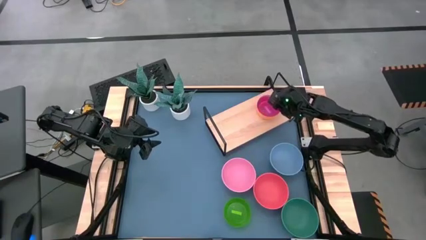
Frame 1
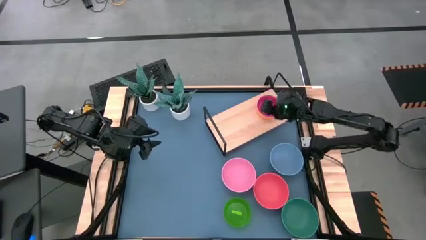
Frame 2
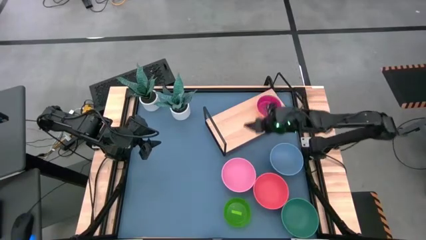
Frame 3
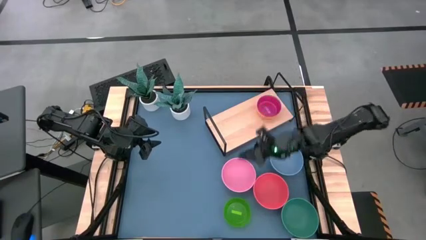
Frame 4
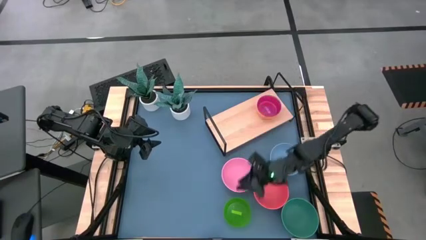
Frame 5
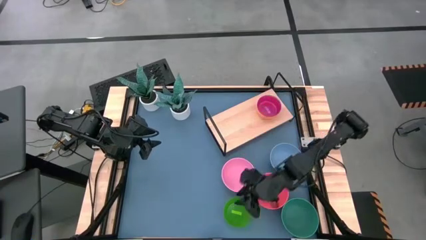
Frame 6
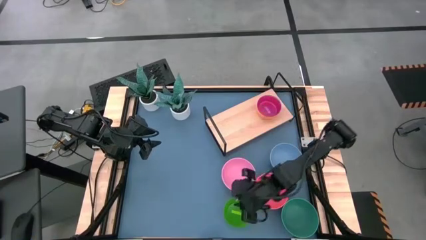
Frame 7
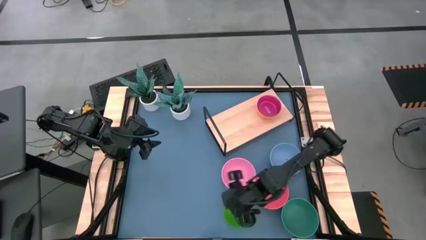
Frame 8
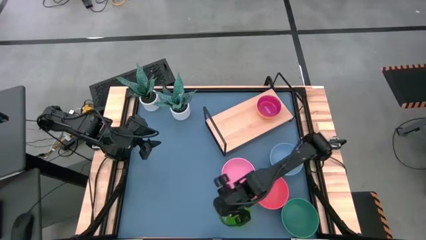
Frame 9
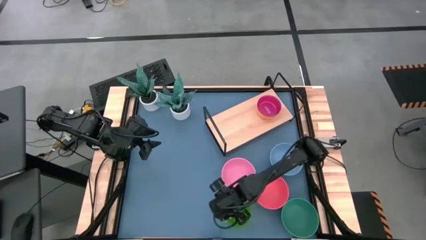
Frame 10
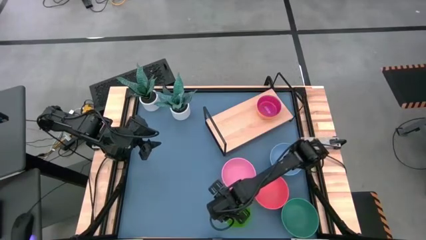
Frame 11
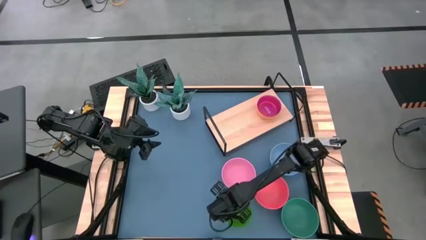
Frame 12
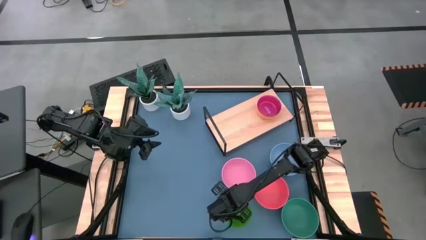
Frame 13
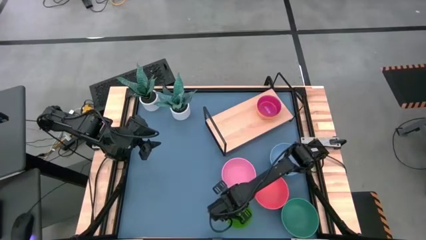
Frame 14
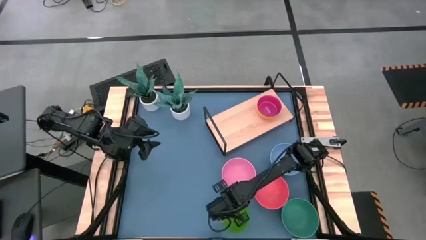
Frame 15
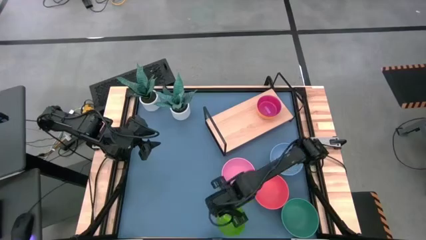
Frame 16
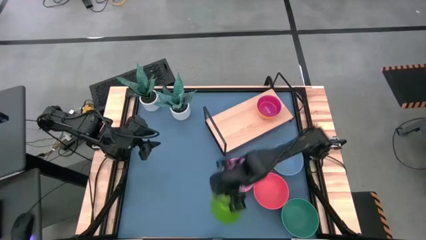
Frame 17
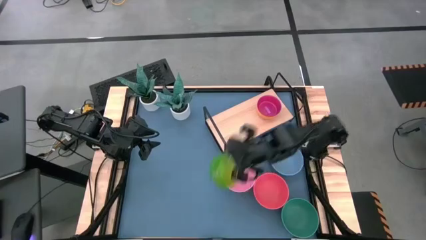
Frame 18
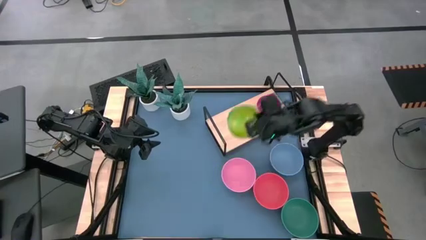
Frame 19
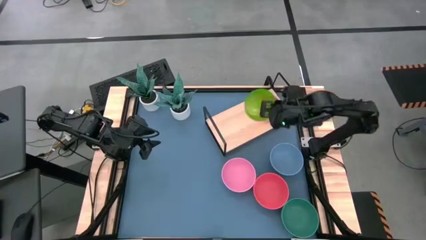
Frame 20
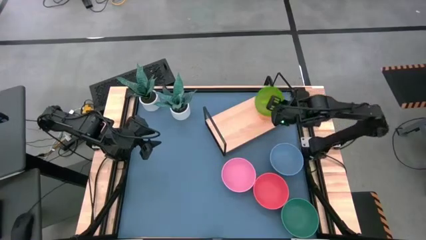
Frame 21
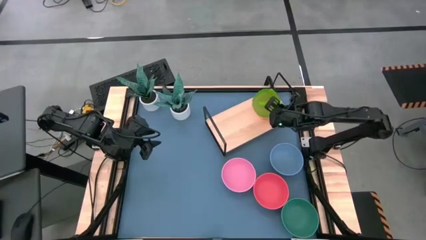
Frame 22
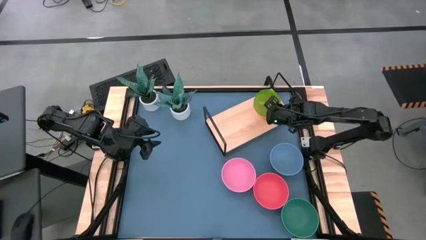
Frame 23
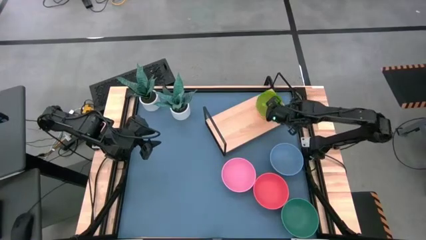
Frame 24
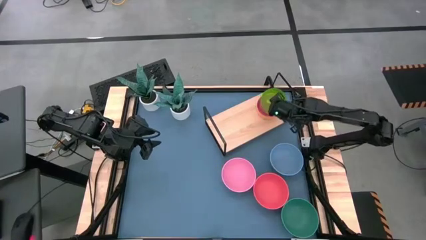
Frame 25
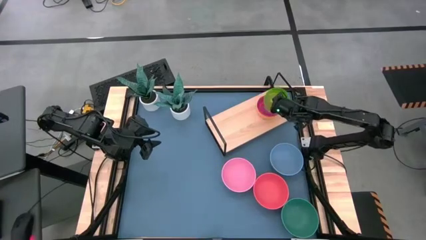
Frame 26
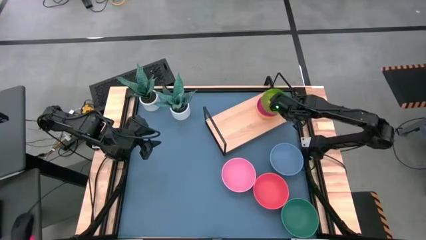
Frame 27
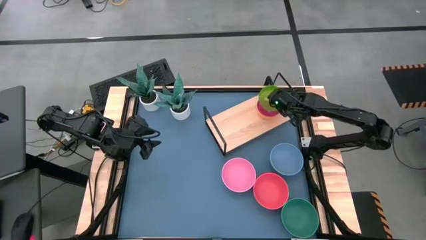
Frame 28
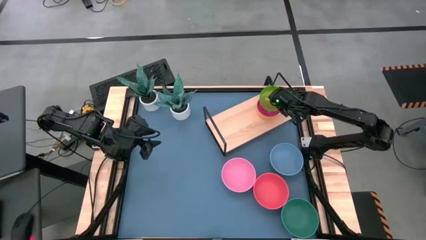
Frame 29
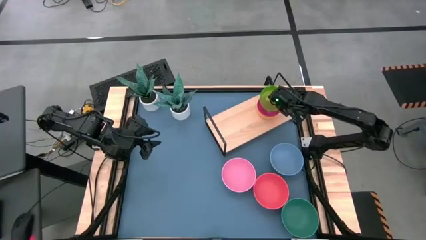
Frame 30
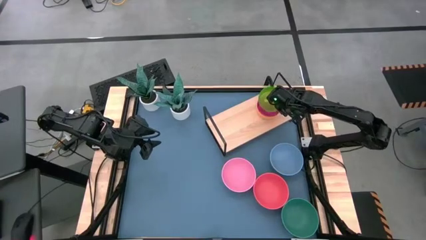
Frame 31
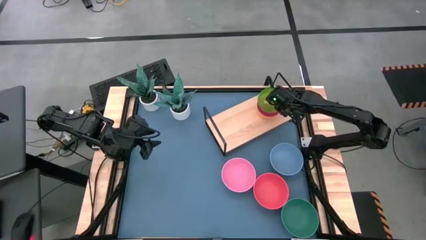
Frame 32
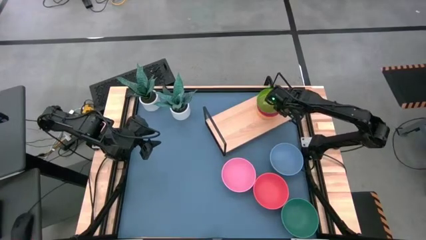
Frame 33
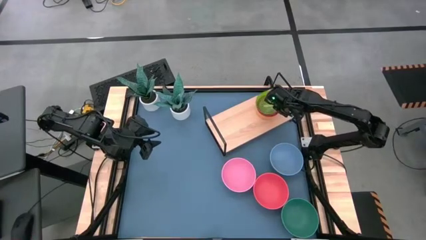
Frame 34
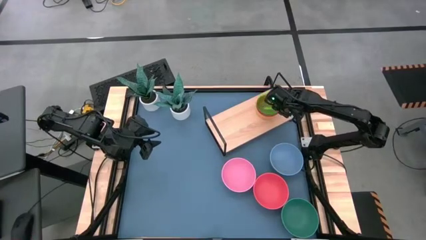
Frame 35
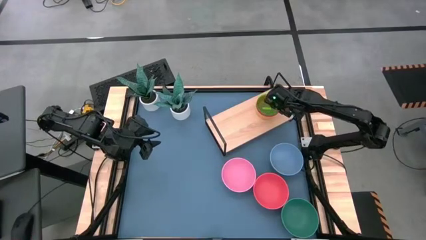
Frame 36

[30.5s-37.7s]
Task: Place and stack bowls onto a shelf
Stack the small green bowl on top of the small purple bowl on the shelf

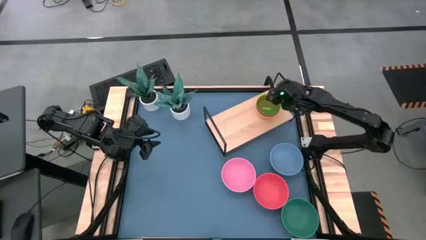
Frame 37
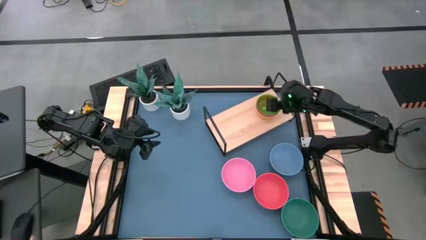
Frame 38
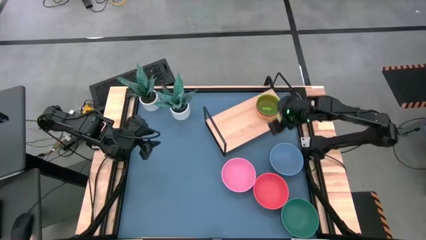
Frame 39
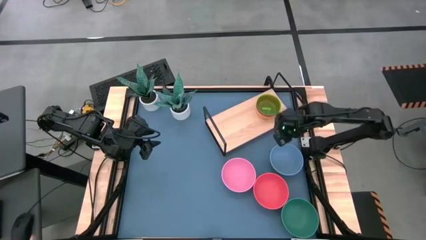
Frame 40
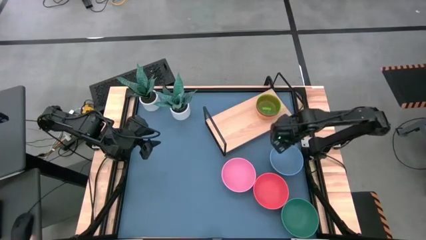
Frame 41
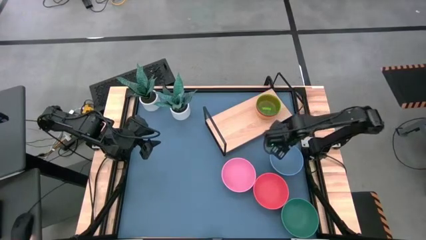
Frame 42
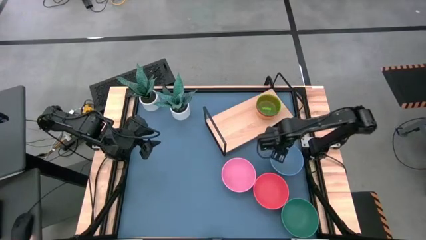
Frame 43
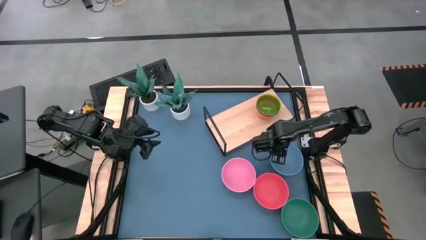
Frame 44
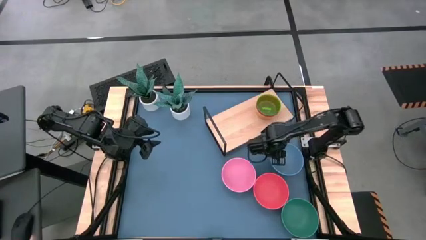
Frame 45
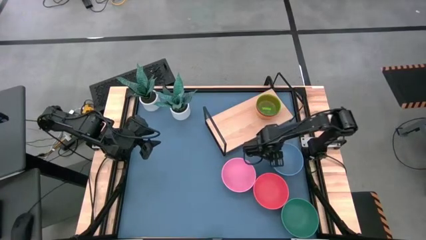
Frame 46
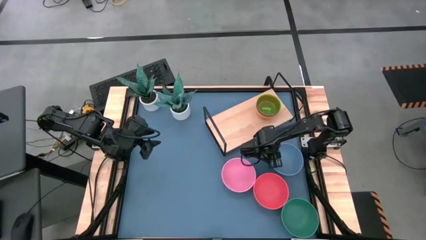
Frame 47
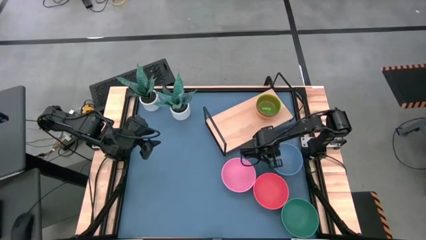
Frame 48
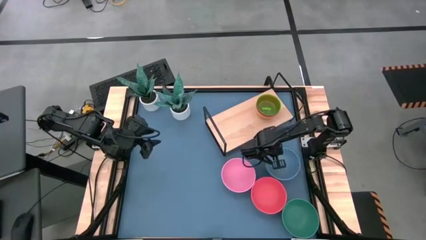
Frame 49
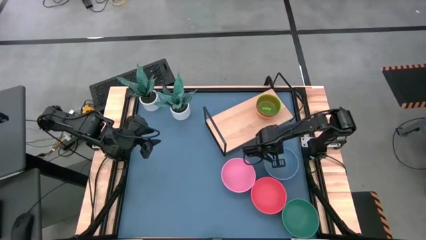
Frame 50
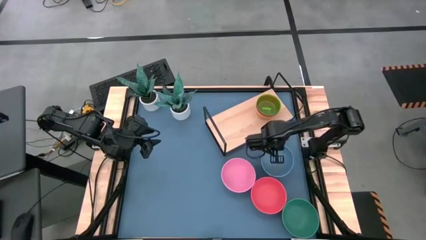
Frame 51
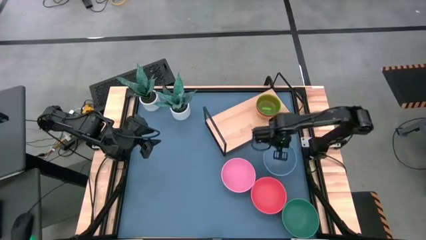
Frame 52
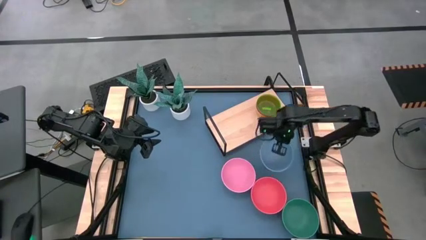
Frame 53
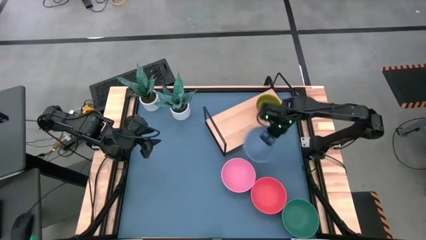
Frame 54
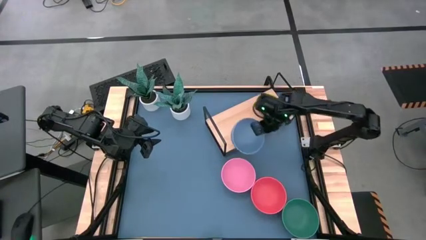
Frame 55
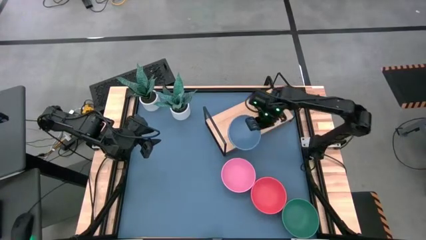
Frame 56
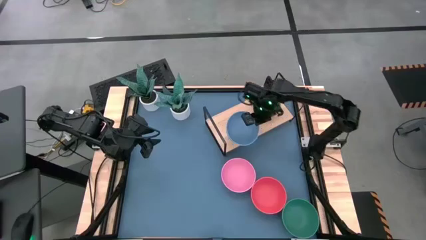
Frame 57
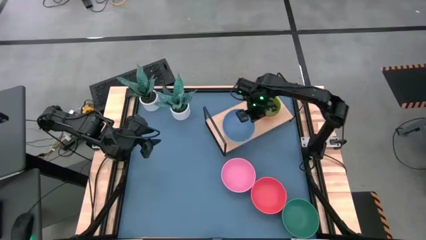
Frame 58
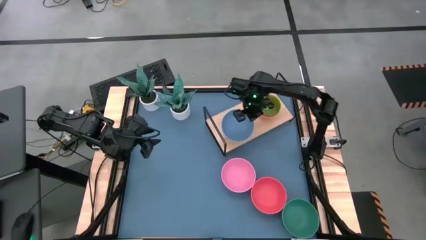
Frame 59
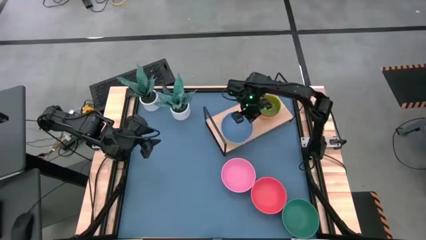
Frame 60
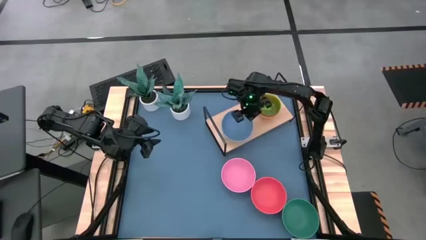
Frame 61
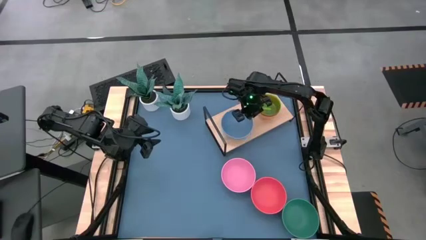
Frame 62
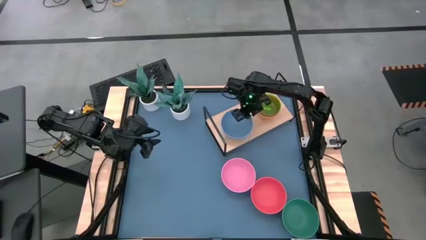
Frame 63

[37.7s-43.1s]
Put the large blue bowl on the shelf

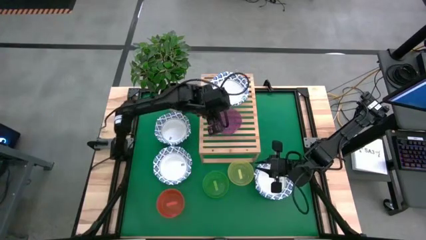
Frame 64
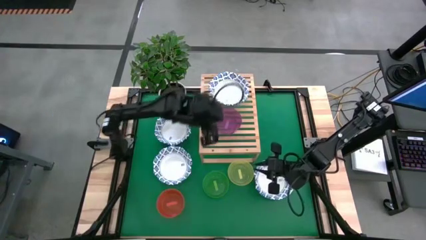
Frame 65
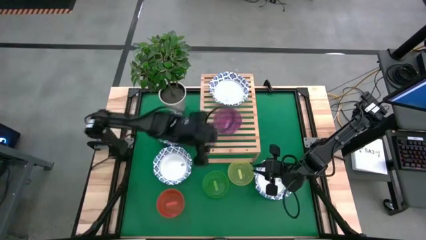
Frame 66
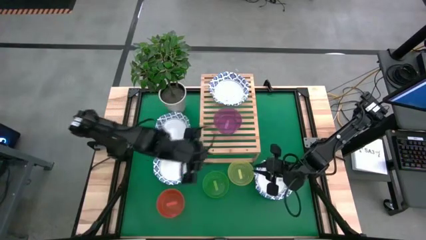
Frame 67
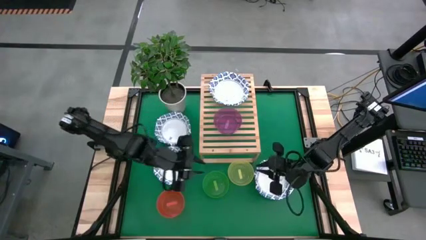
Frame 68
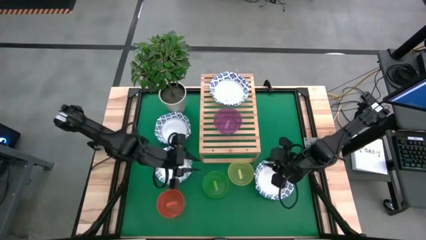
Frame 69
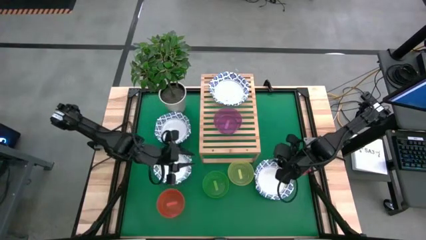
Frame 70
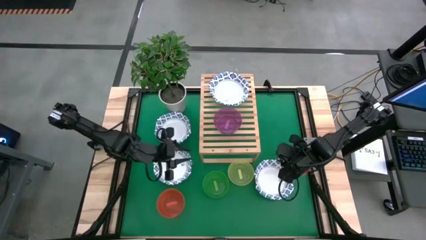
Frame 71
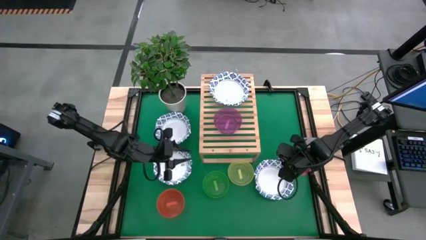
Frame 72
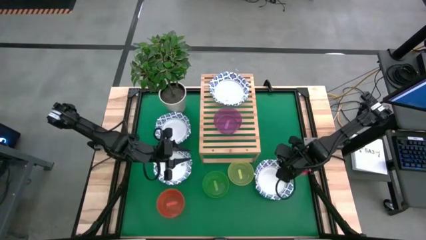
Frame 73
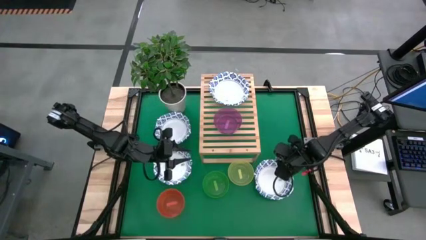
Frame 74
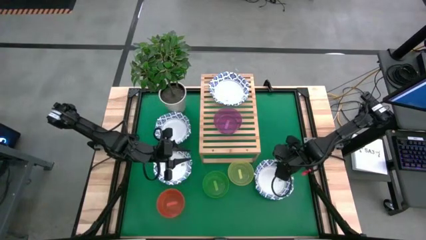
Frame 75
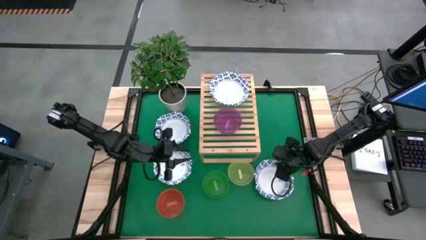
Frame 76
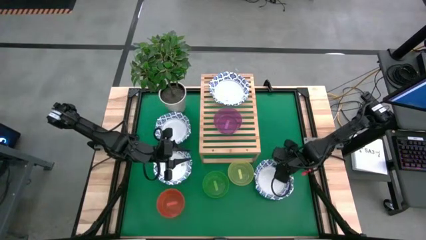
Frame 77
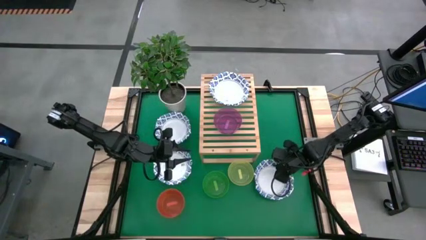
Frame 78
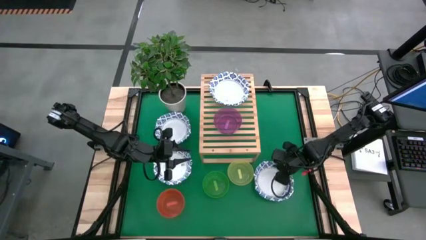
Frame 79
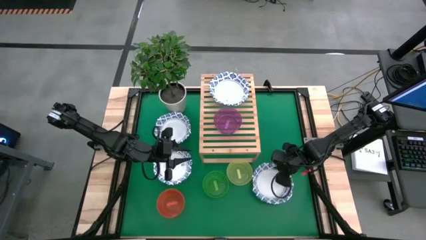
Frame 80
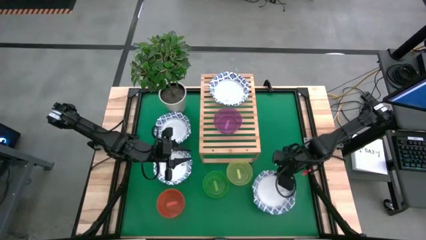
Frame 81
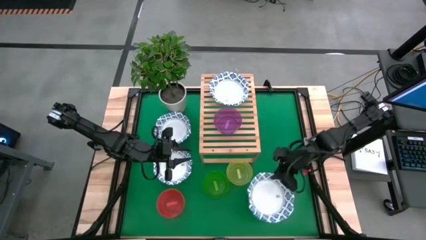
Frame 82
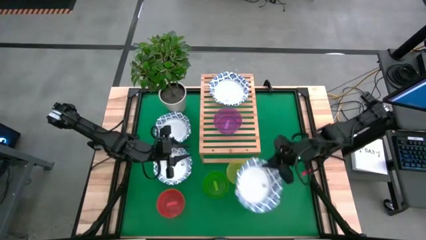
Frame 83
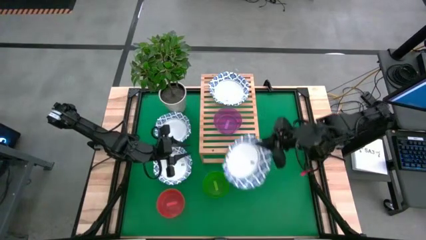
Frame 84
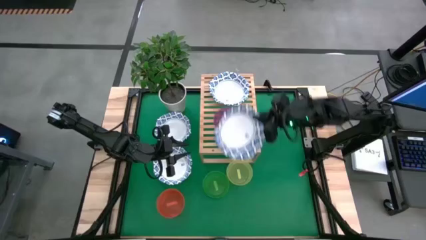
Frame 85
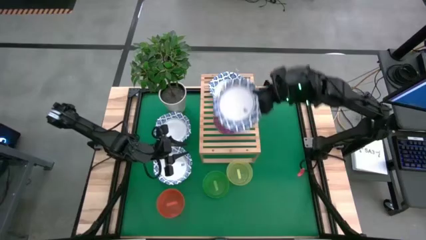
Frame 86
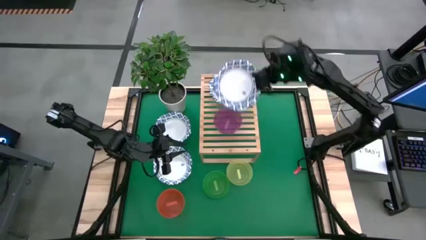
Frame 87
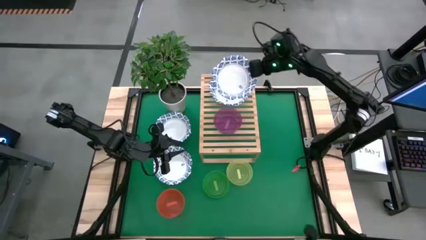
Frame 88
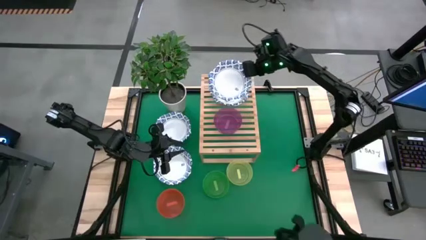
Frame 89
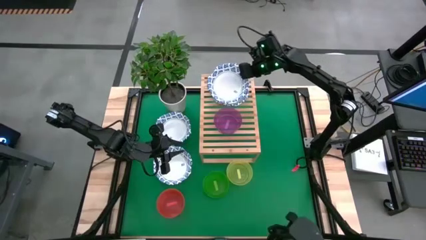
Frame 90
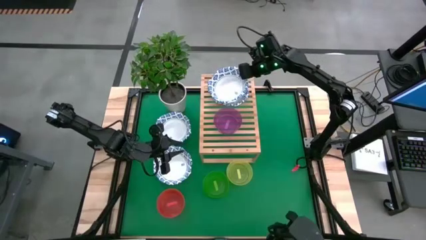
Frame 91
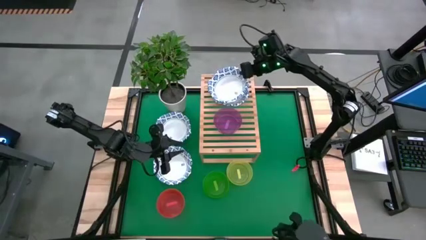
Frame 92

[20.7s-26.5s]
Task: Place and stack bowls onto a shelf
Stack the white patterned bowl on top of the other white patterned bowl on the shelf
